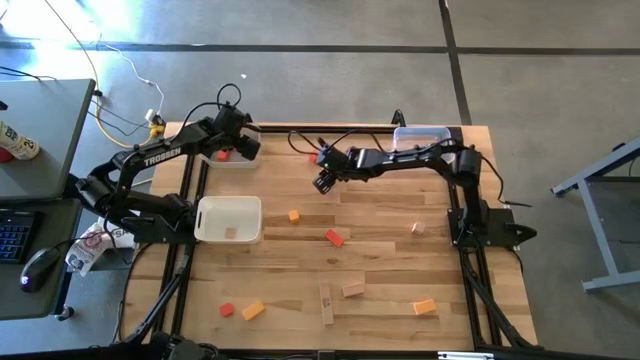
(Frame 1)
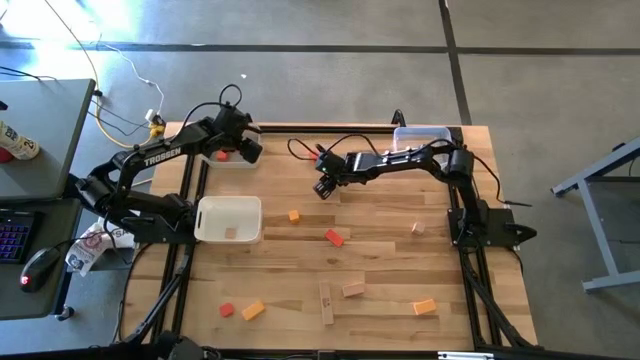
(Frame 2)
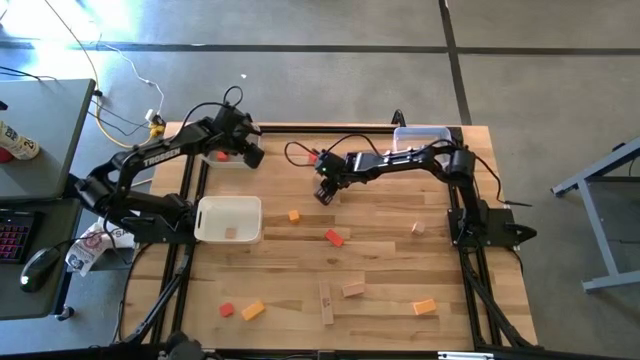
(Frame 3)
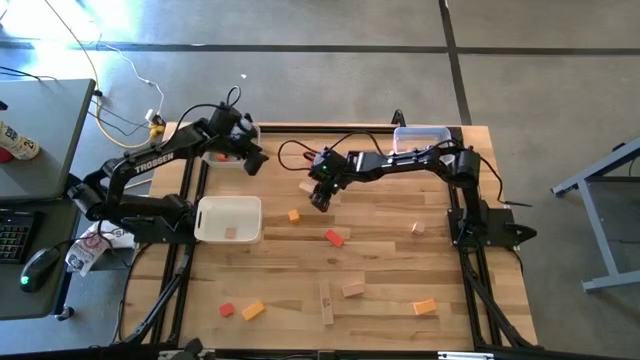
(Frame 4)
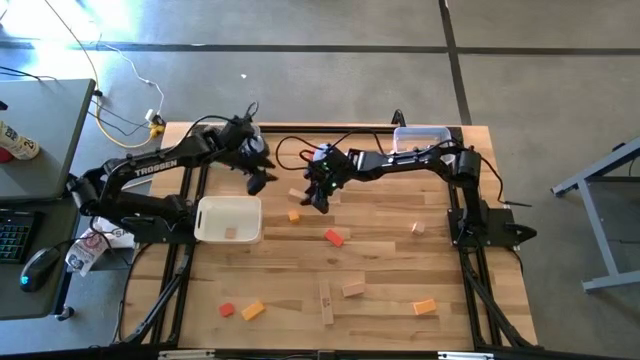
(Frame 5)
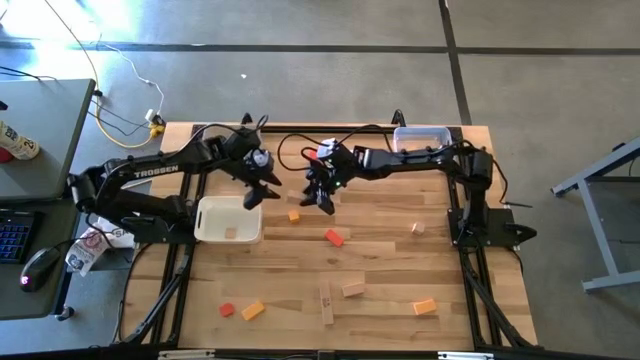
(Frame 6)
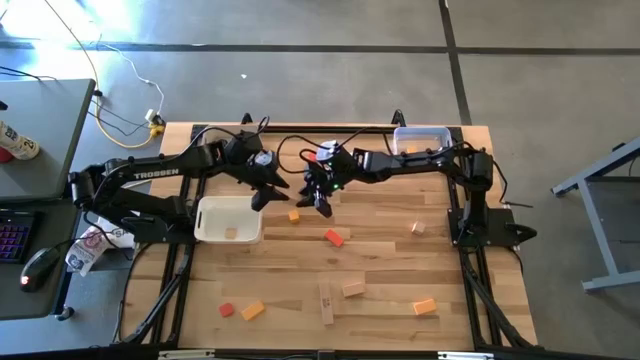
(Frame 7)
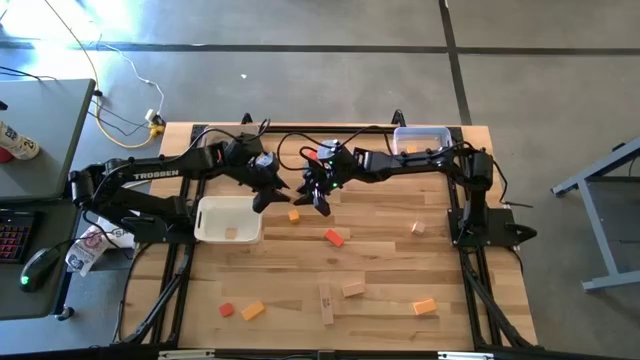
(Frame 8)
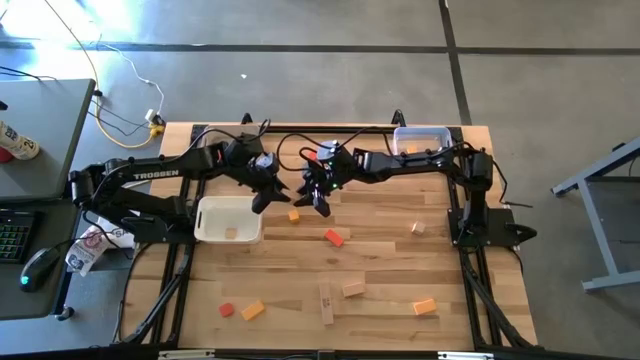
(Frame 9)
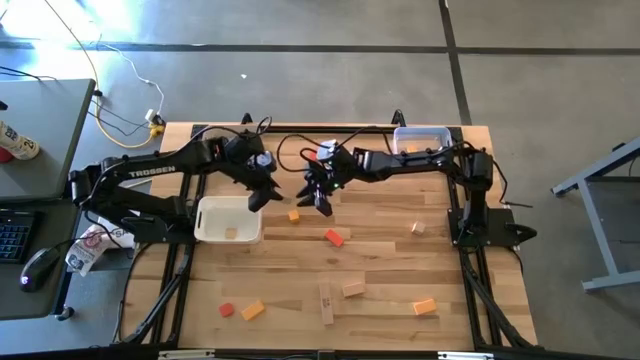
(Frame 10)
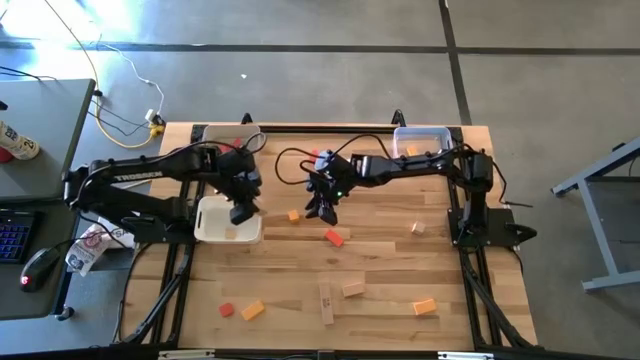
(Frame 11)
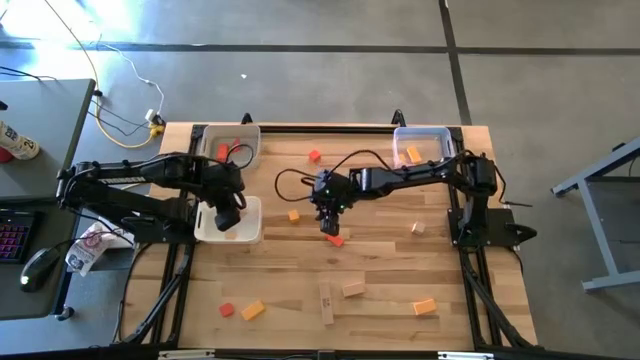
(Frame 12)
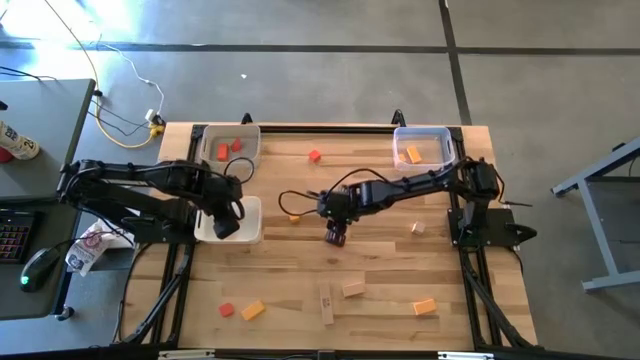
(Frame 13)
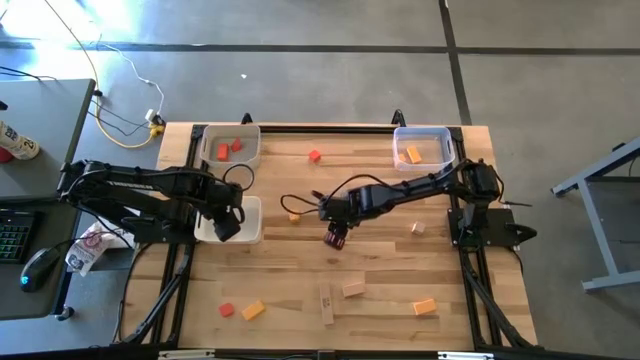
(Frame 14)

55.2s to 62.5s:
Task: Sort & place blocks by color
Put the brown block into the white bin

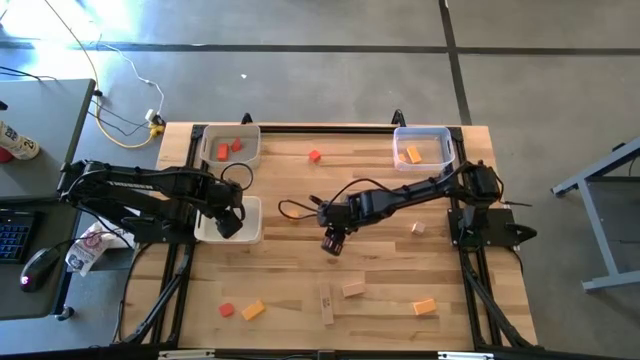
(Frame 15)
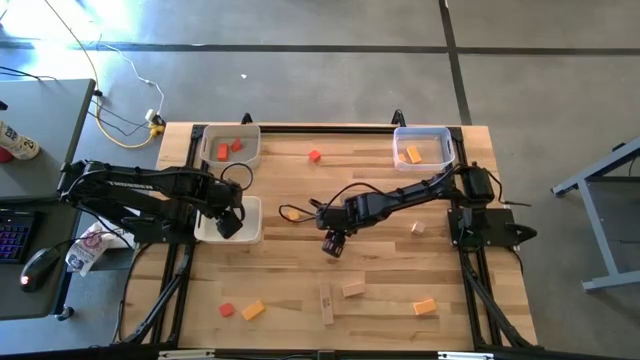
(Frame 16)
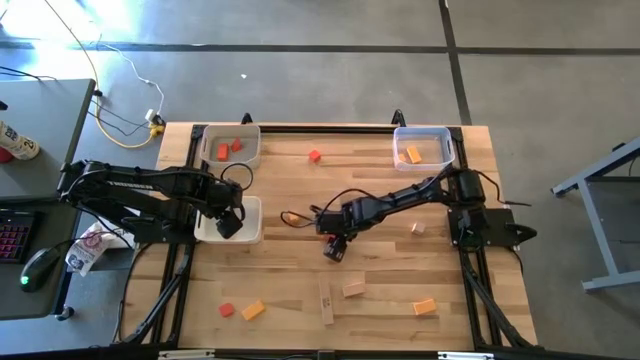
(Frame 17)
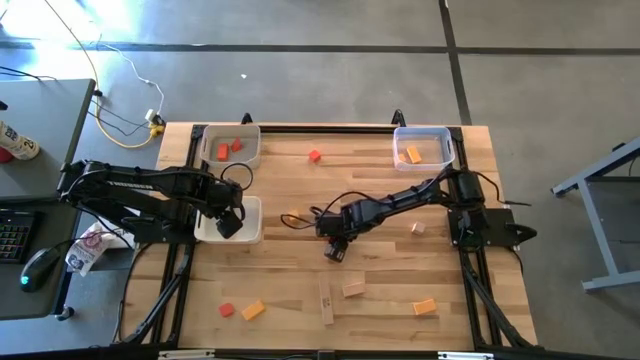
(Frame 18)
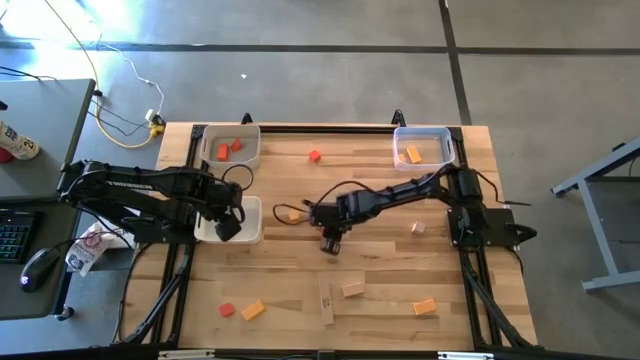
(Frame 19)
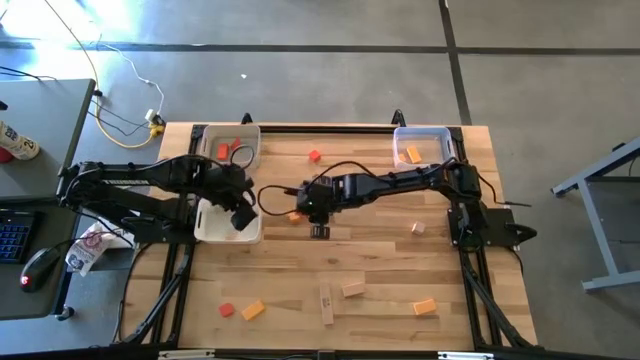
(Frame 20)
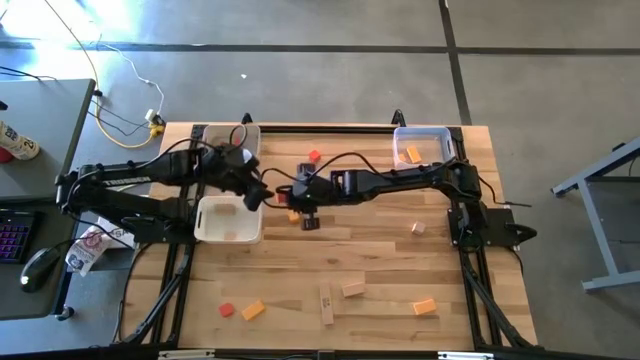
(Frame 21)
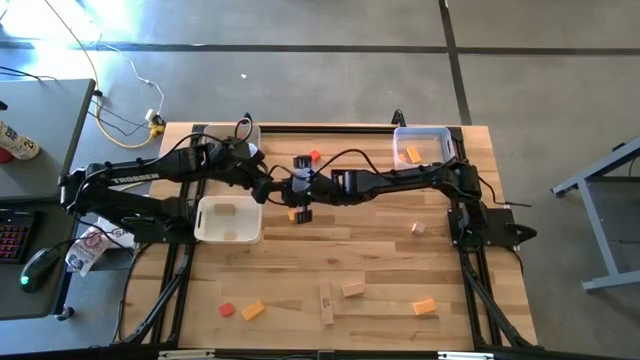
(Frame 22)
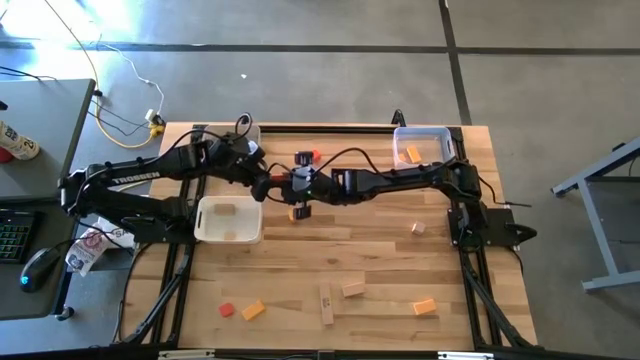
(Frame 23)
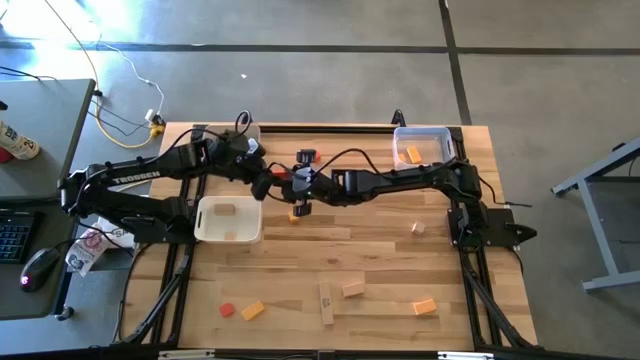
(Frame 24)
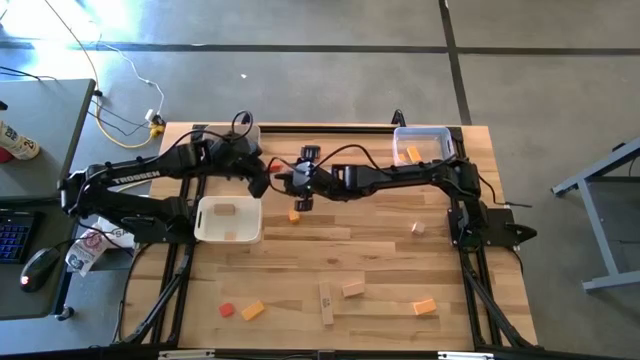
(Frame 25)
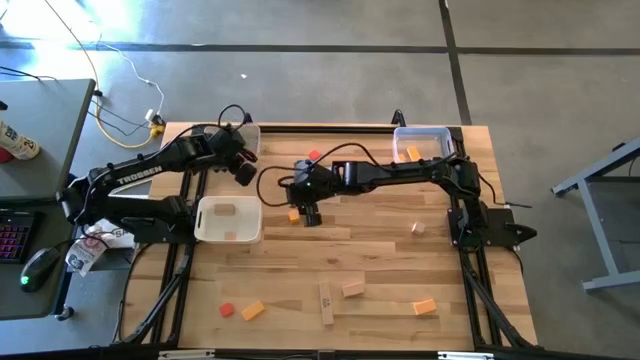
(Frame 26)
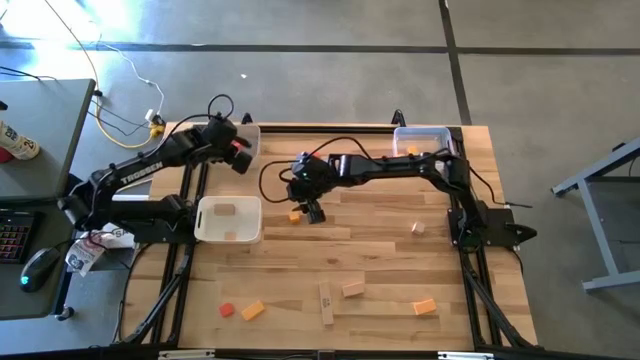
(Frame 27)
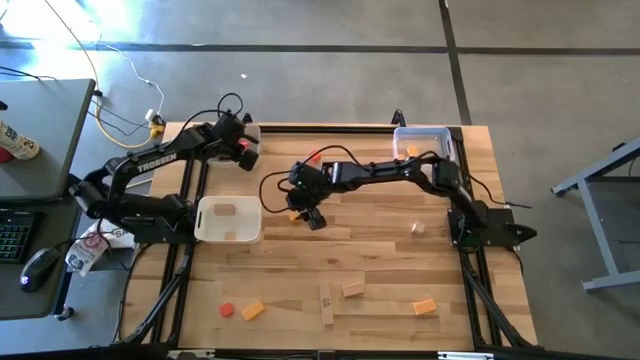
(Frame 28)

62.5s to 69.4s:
Put the orange block into the gray bin

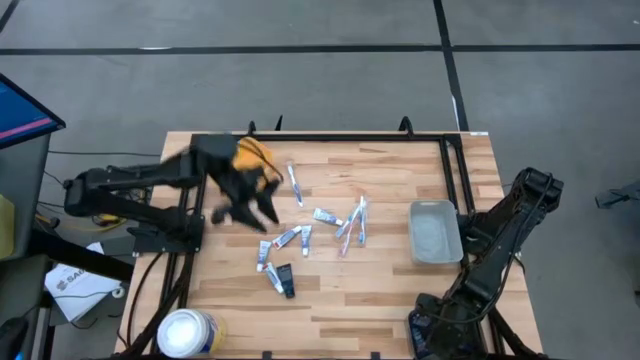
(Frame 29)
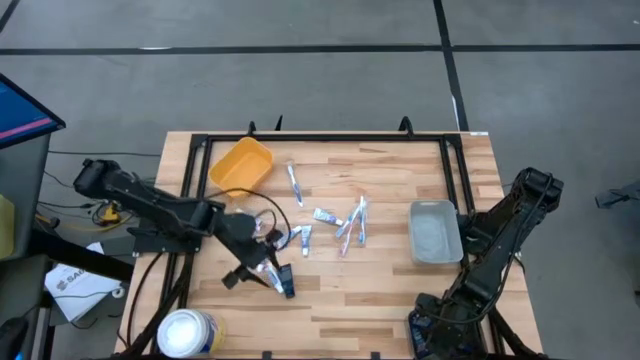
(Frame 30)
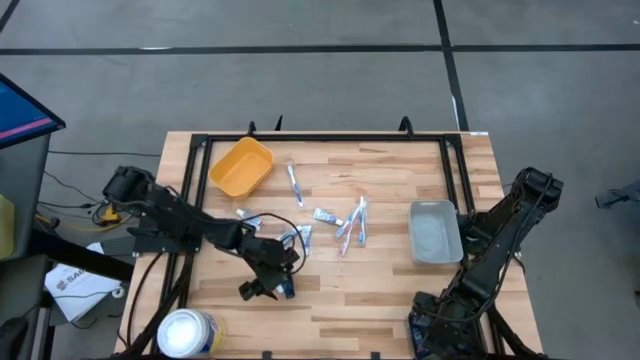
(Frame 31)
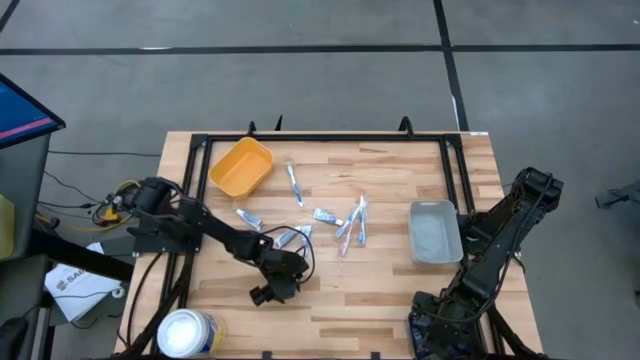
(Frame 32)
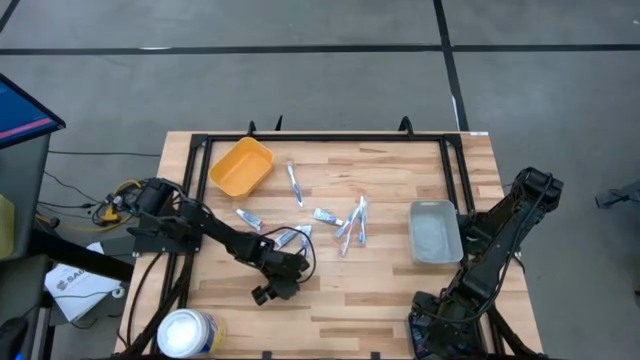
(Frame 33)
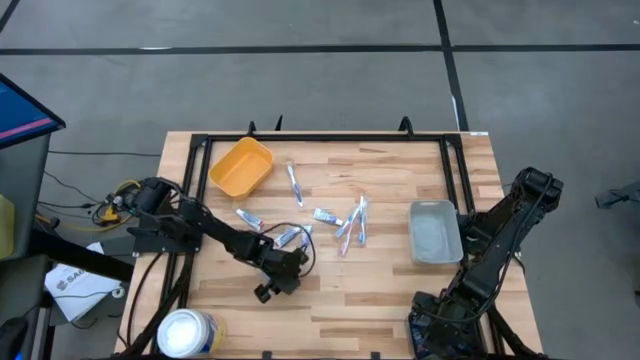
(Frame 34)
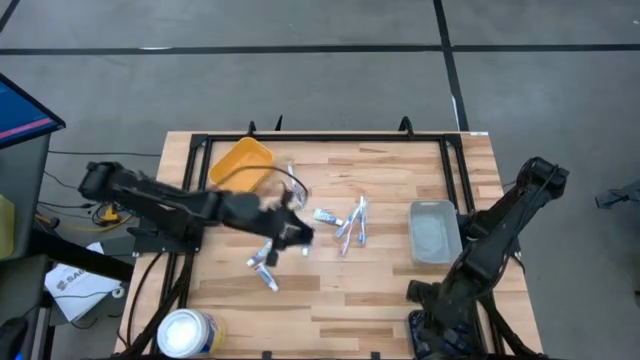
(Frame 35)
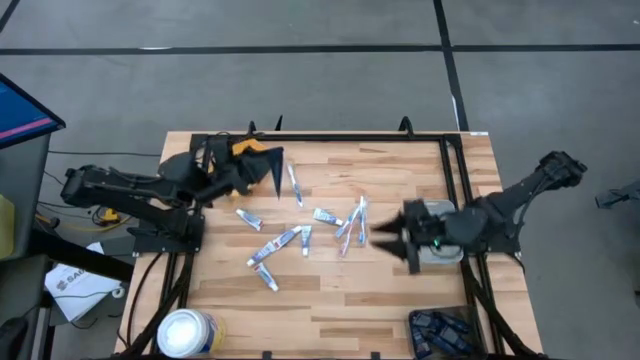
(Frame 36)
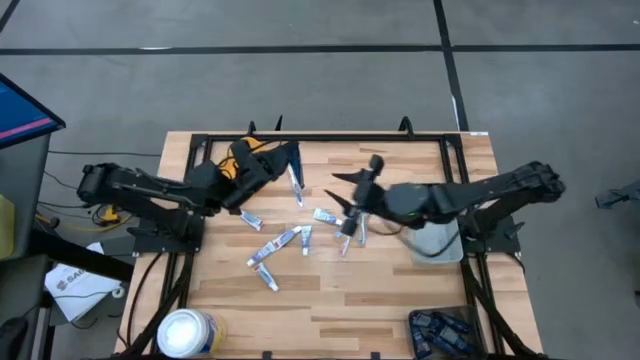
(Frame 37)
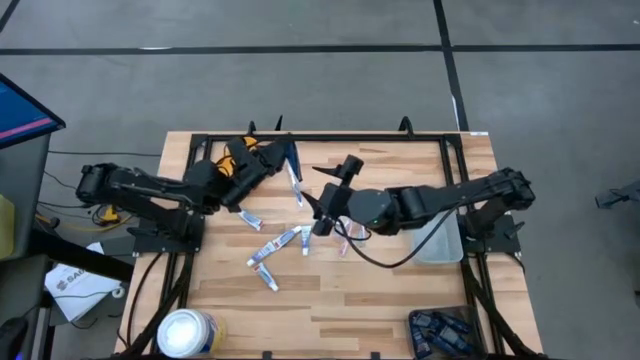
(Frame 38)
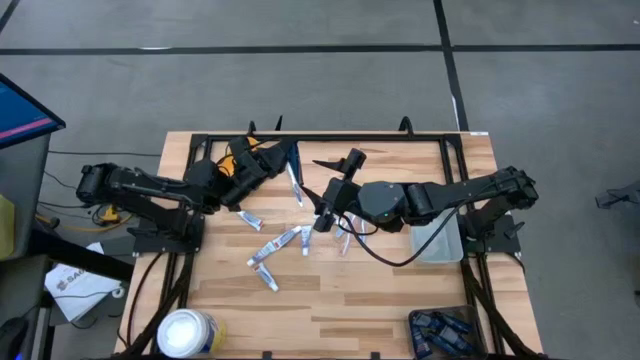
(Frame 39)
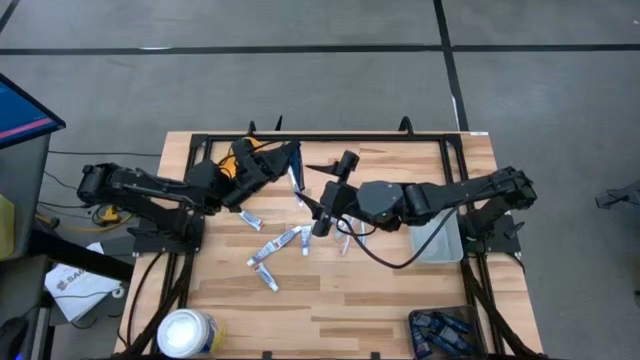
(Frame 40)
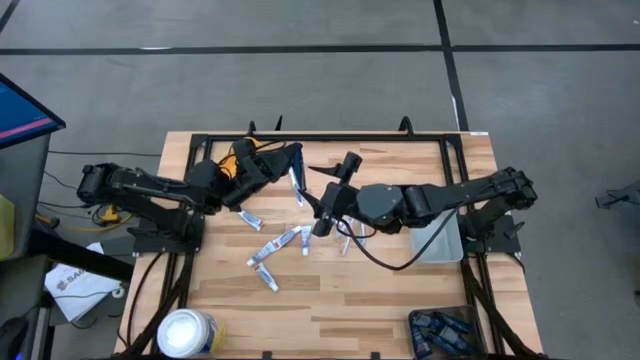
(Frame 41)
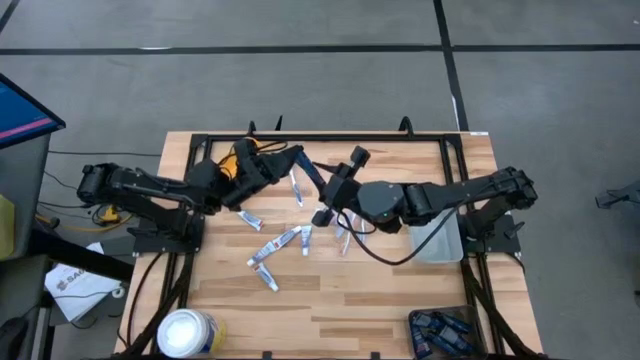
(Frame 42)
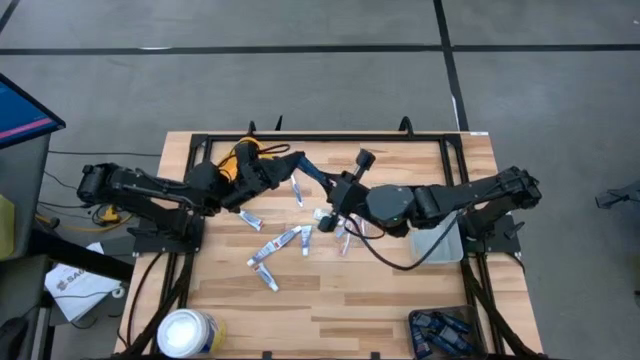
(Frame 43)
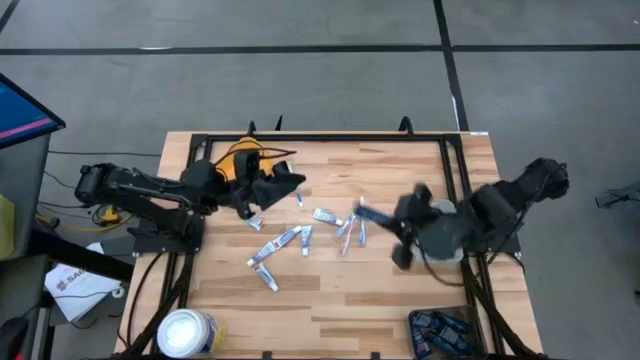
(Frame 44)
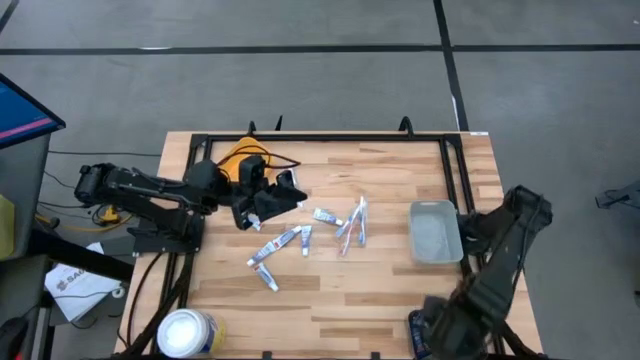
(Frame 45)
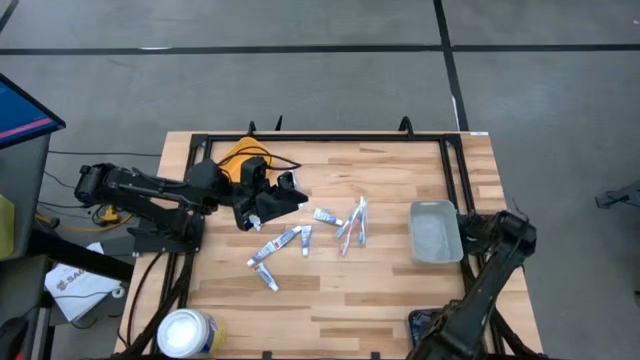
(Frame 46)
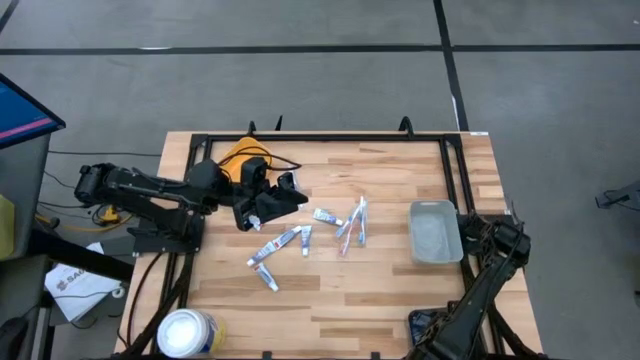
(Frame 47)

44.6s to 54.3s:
Task: Pick & Place Travel size toiletries
Put the blue shave cream into the black bin
